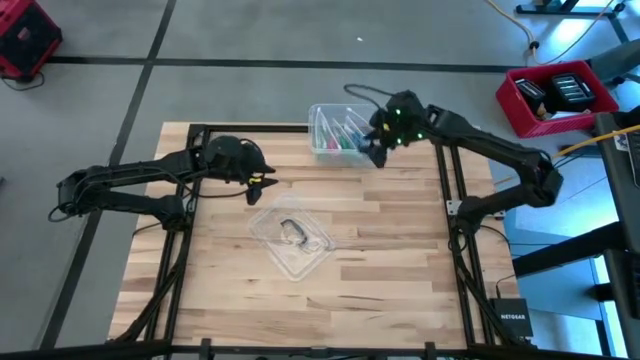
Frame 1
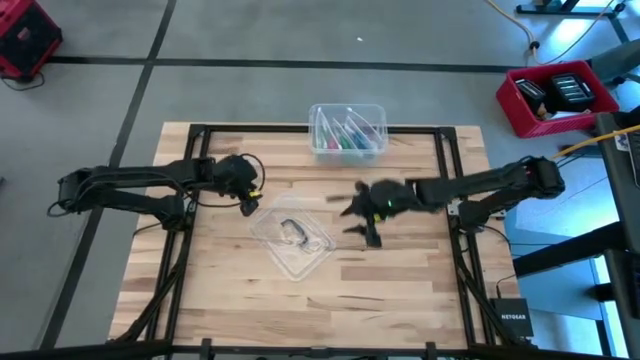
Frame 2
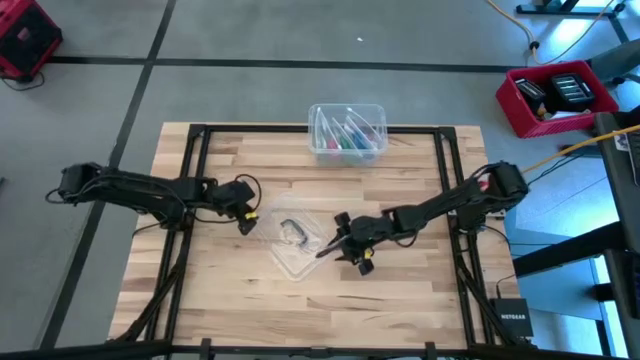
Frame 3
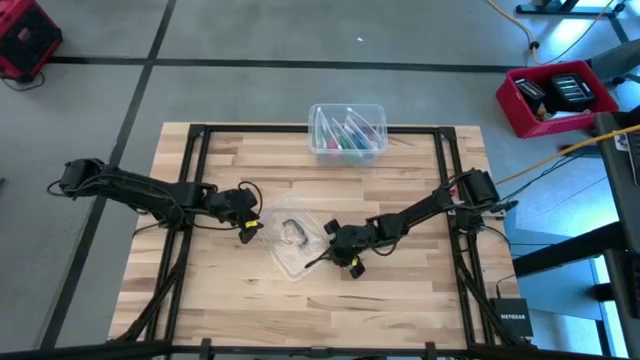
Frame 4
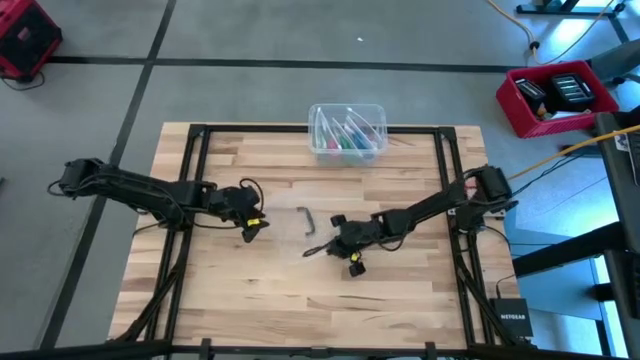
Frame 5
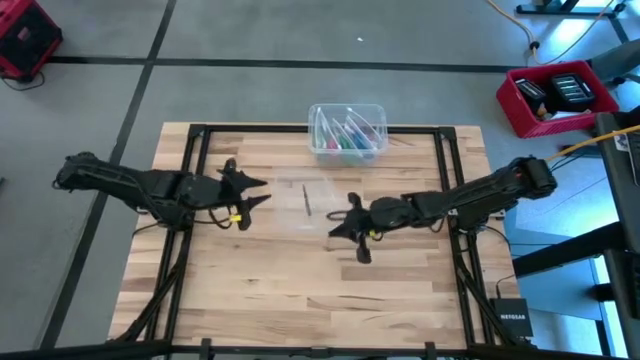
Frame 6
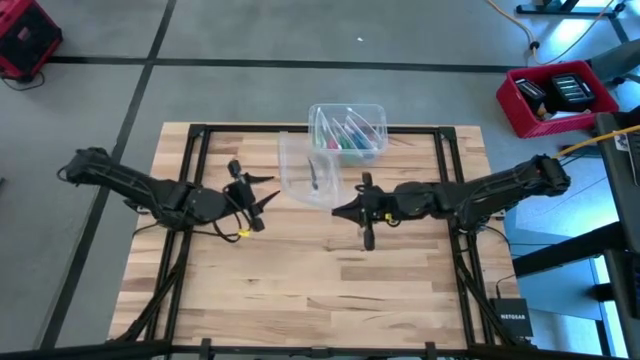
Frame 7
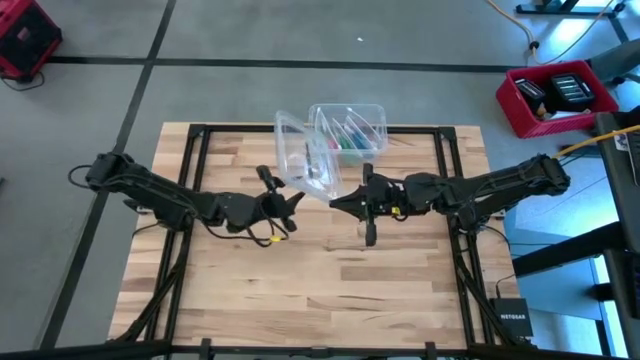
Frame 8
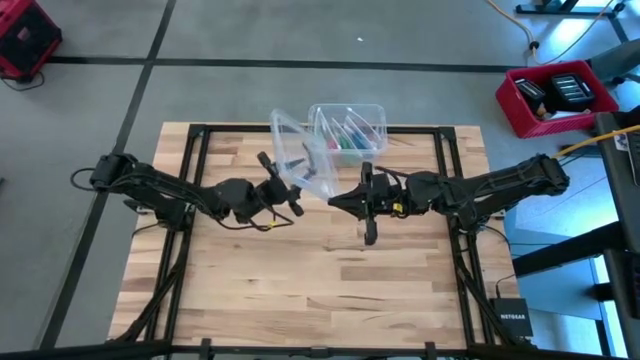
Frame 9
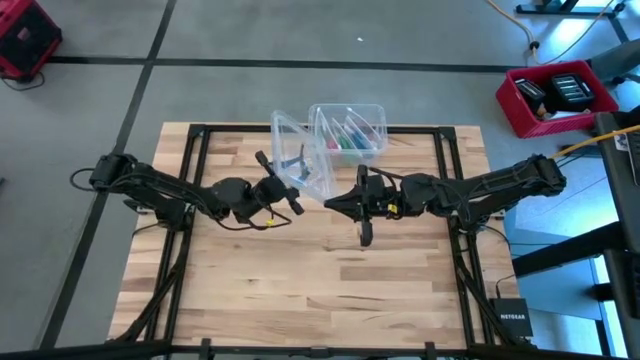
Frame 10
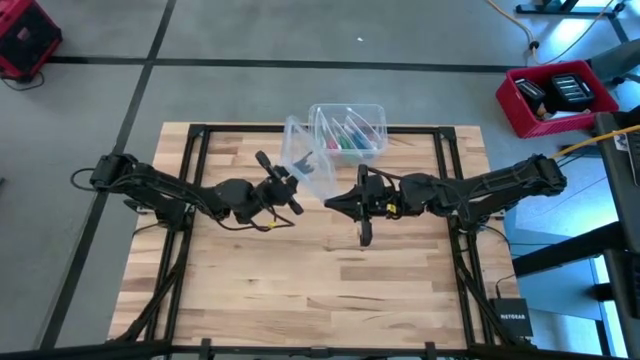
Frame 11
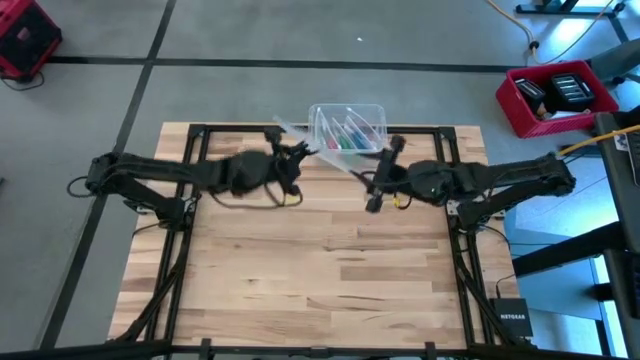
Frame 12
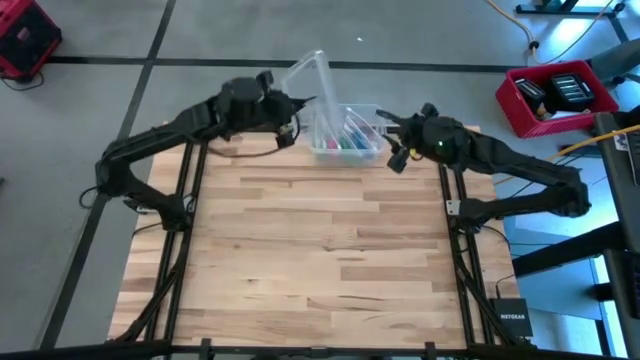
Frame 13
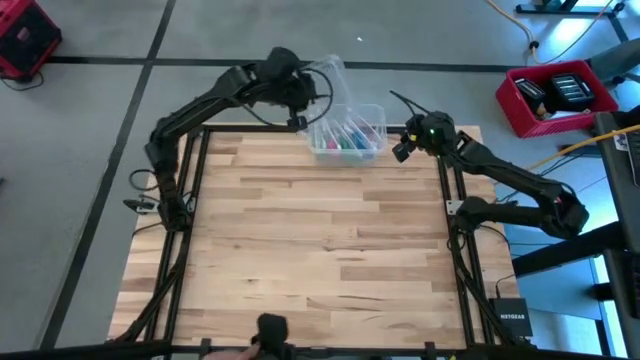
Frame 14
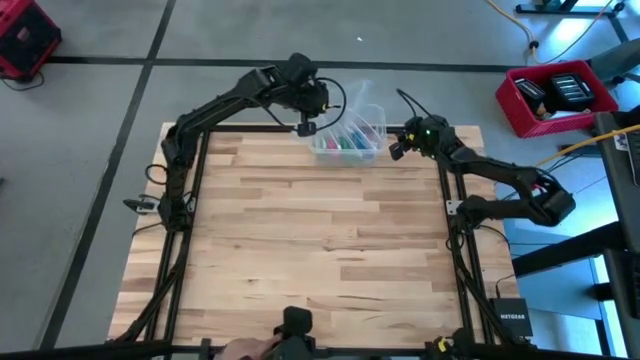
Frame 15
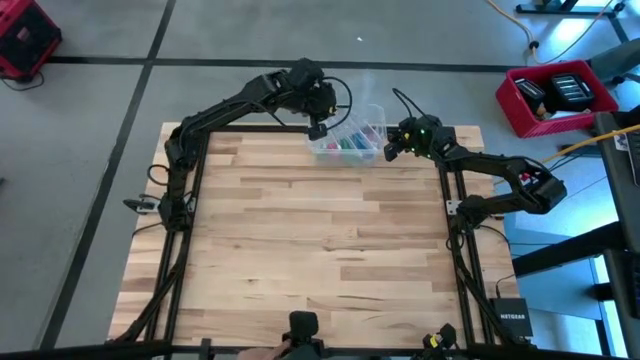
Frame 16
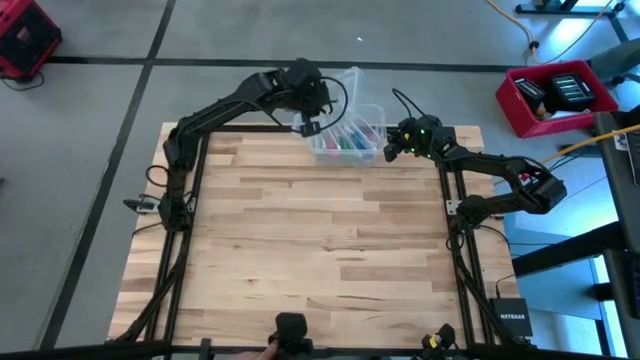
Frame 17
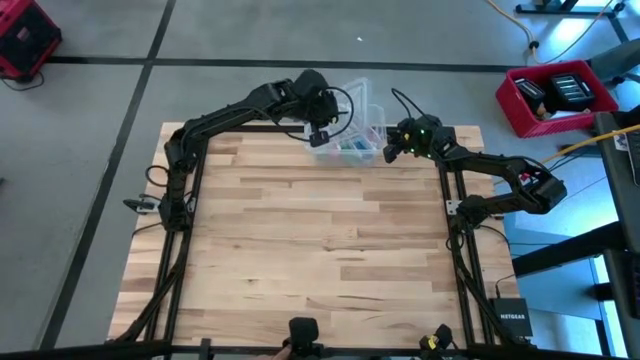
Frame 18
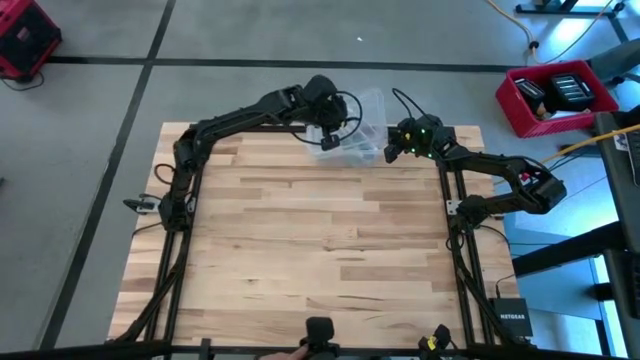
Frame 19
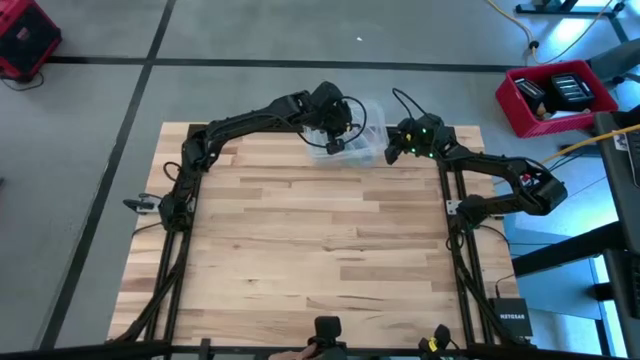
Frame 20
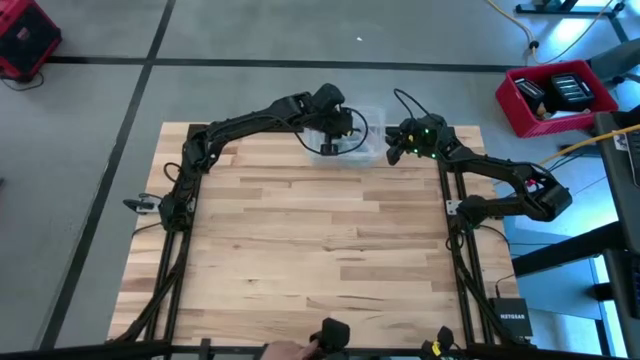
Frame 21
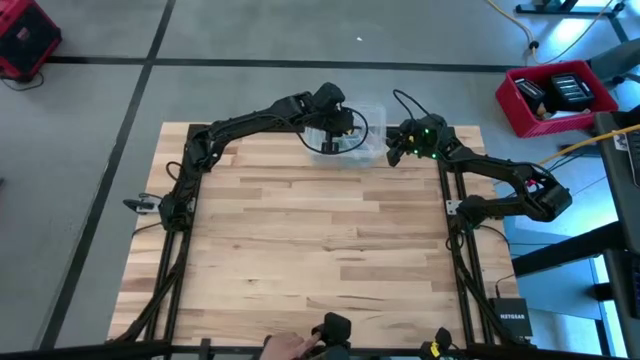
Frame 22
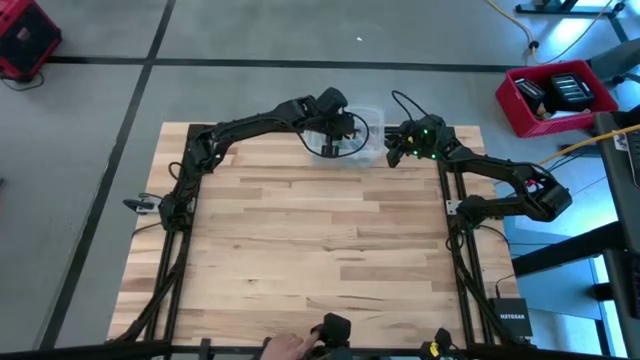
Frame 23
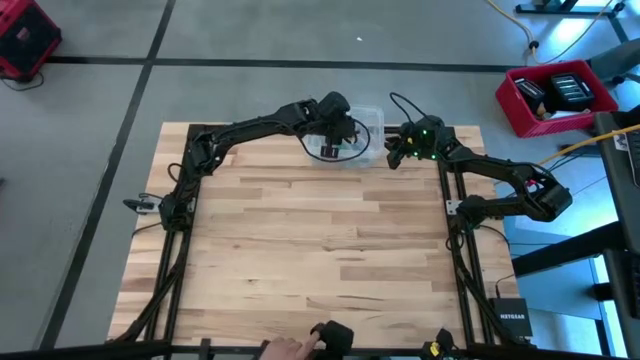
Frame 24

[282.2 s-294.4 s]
Task: Roll bandage
Close the transparent bin

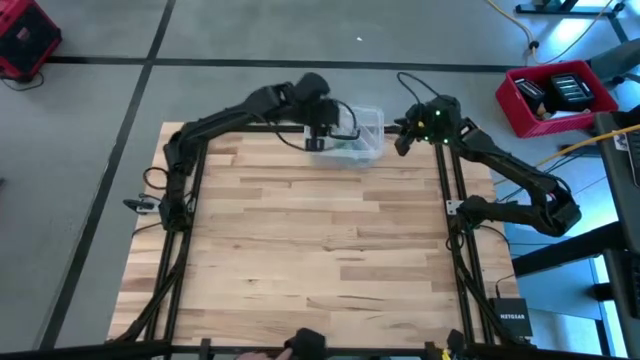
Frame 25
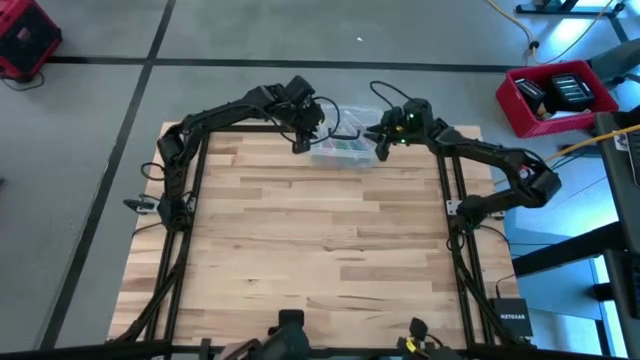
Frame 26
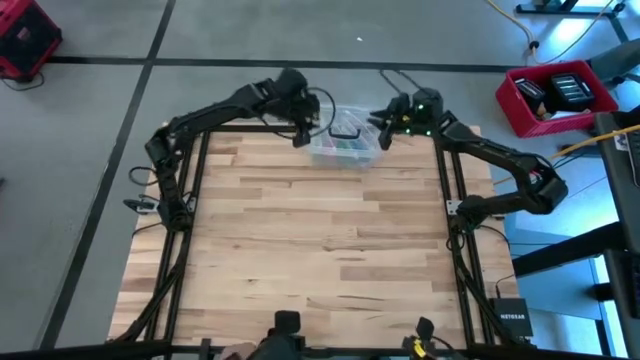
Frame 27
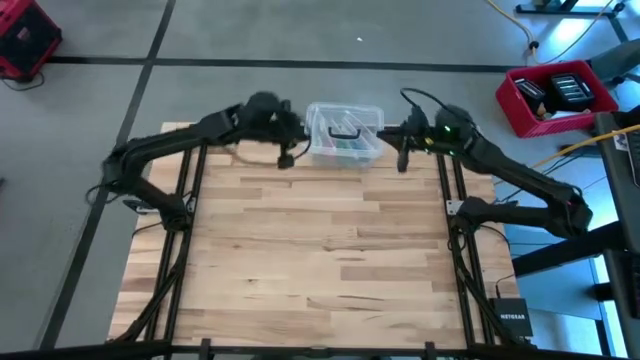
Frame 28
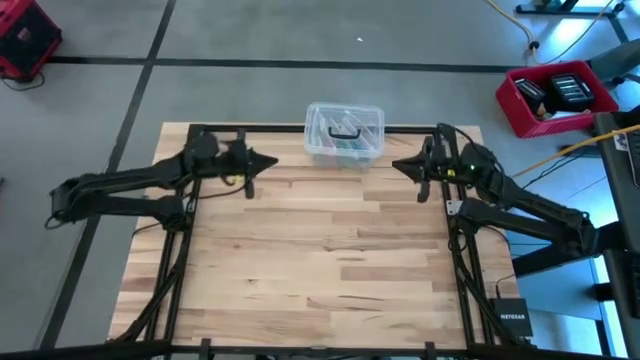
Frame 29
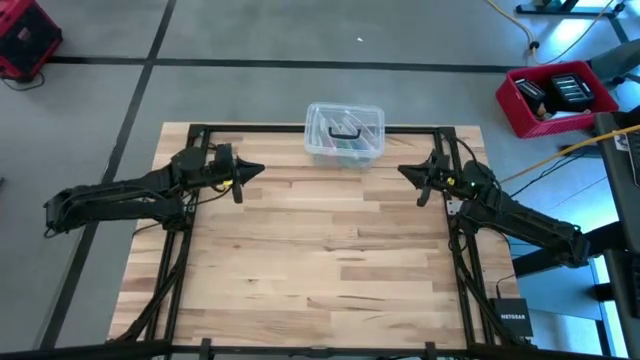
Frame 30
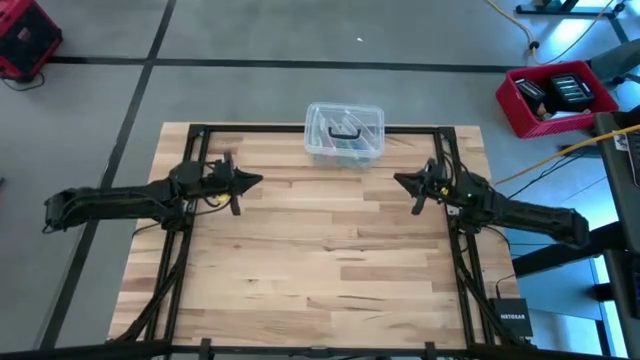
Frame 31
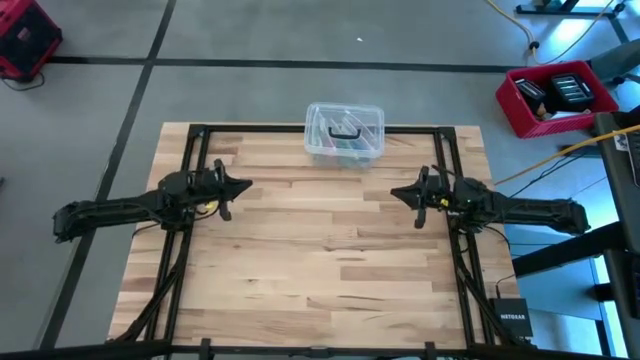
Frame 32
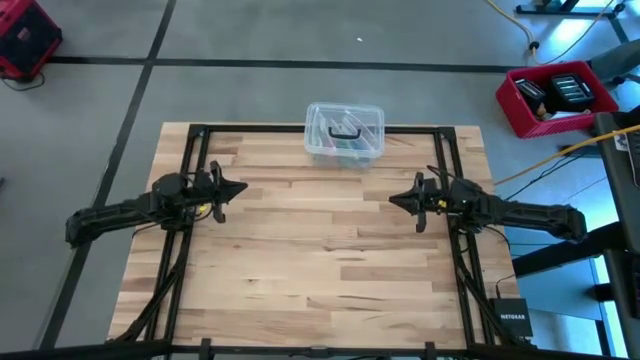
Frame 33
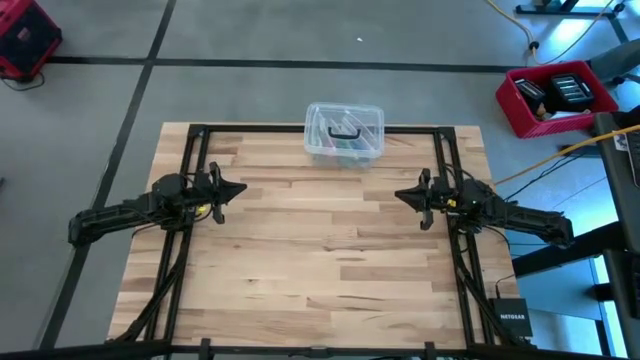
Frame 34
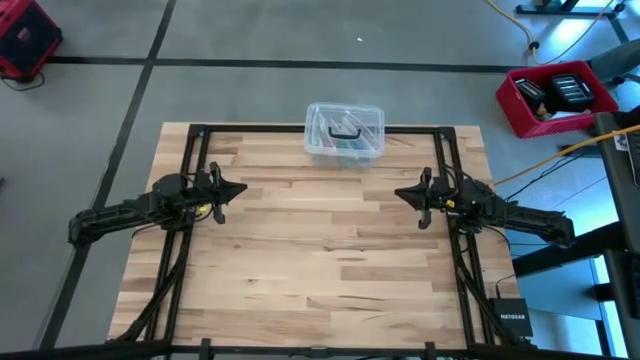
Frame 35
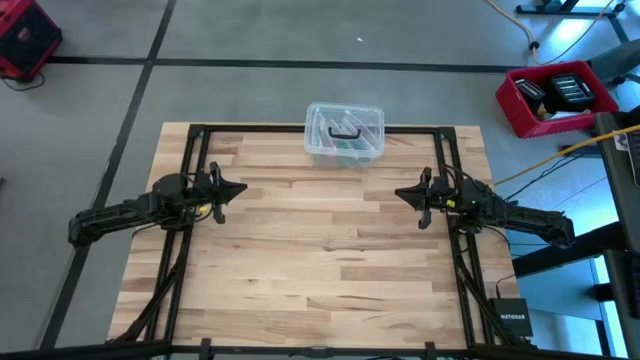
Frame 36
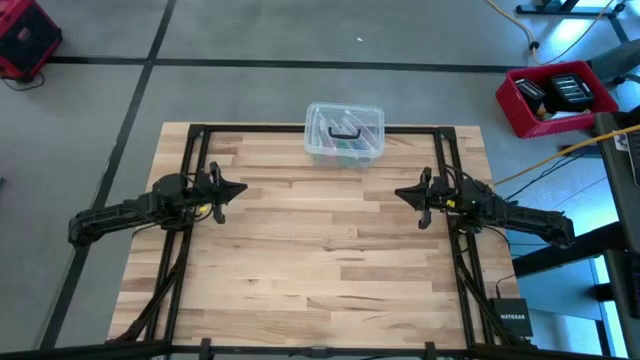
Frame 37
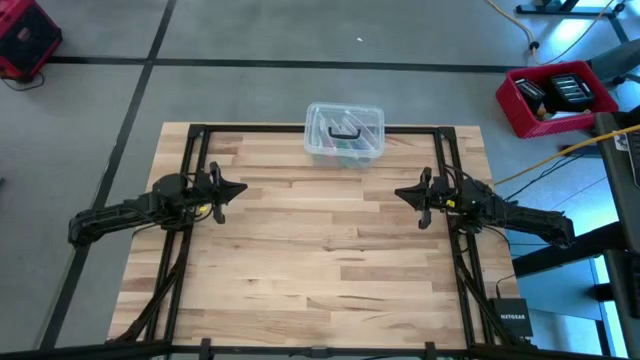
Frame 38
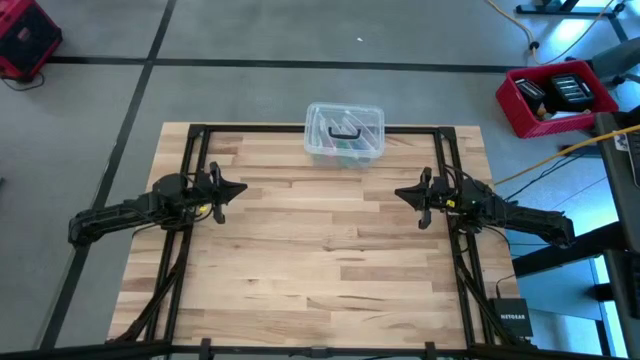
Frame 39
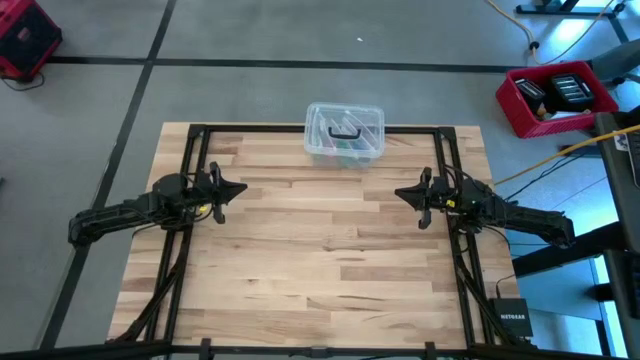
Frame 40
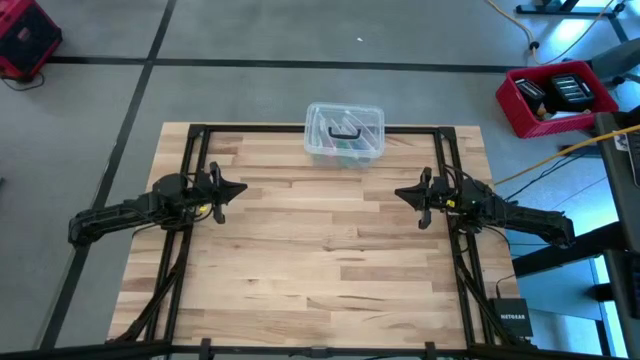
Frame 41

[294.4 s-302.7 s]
Return to Home Position

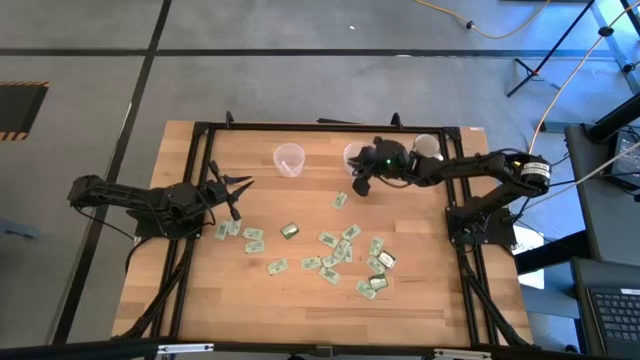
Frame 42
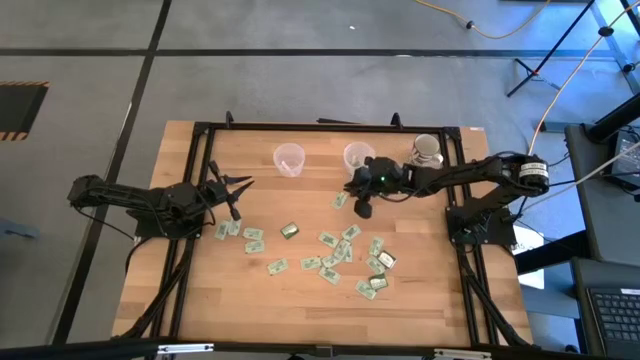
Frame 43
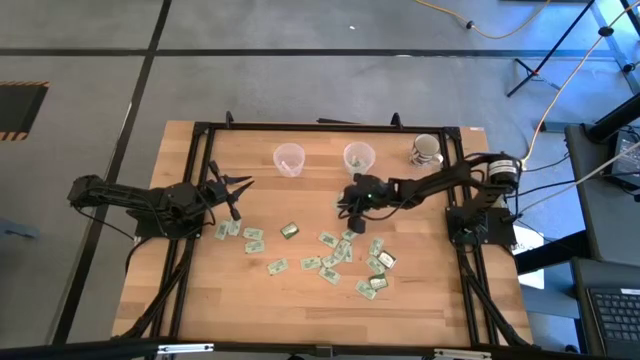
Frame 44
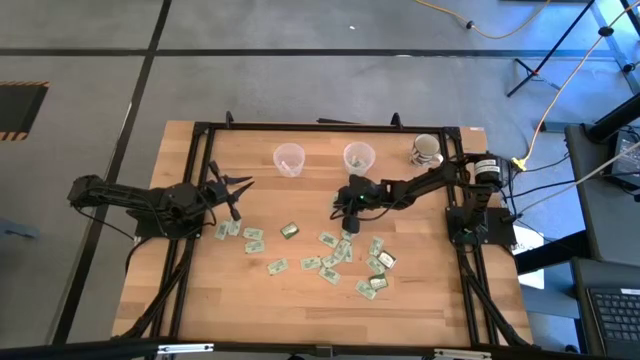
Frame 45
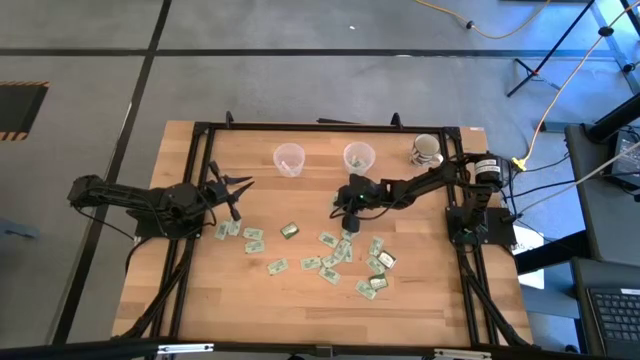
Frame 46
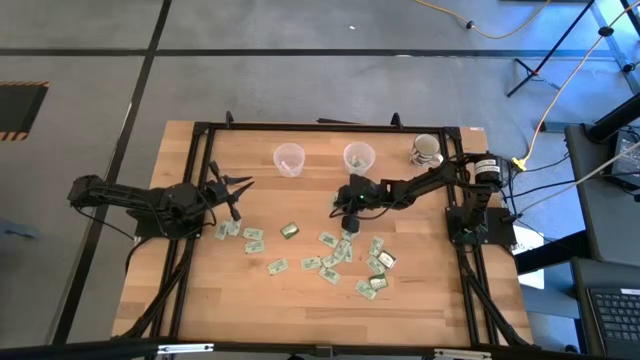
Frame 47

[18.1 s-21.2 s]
Task: Pick and place Stevia / Truvia into bins
Put the stevia packet into the right transparent container
